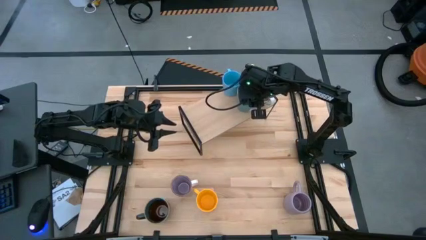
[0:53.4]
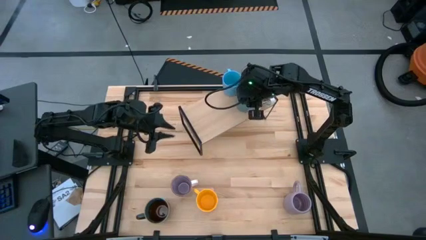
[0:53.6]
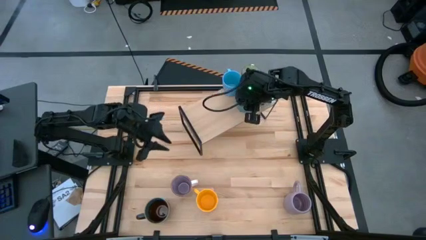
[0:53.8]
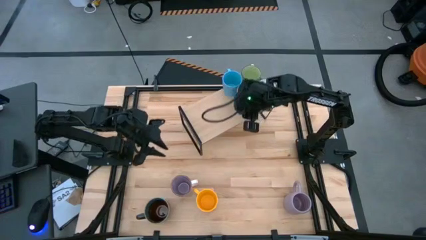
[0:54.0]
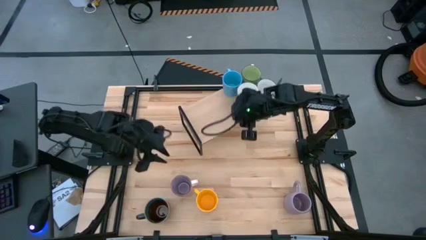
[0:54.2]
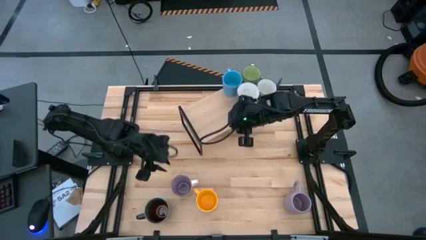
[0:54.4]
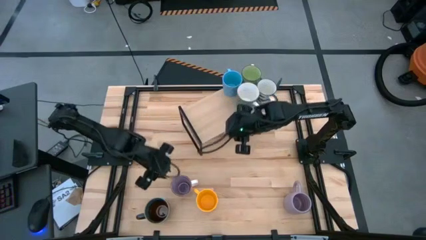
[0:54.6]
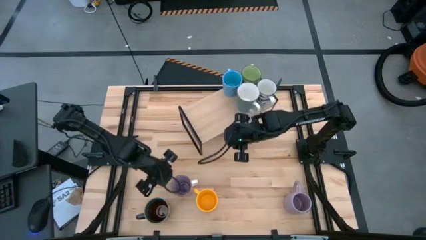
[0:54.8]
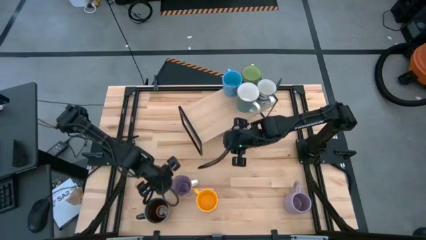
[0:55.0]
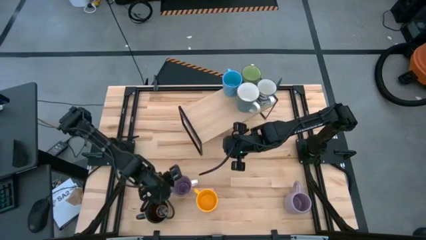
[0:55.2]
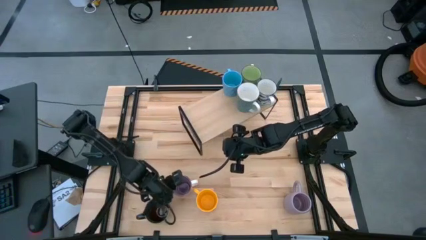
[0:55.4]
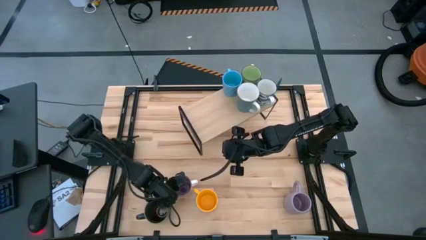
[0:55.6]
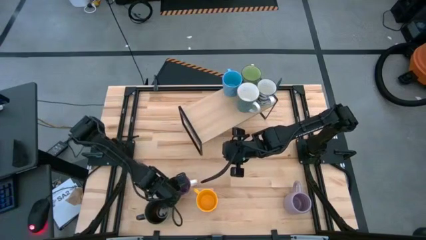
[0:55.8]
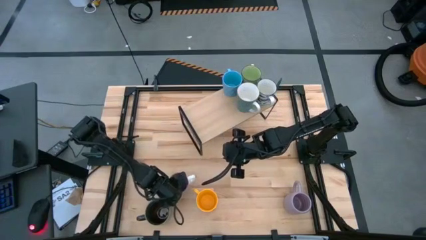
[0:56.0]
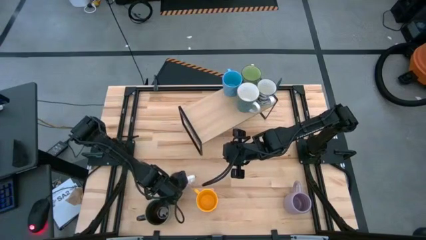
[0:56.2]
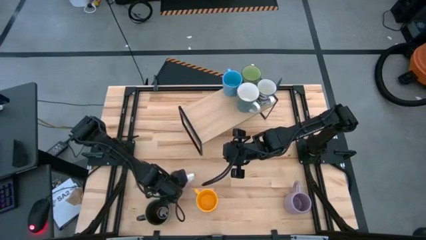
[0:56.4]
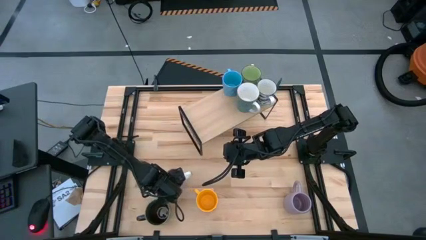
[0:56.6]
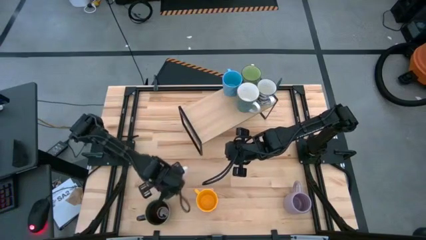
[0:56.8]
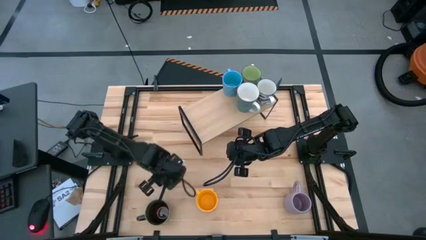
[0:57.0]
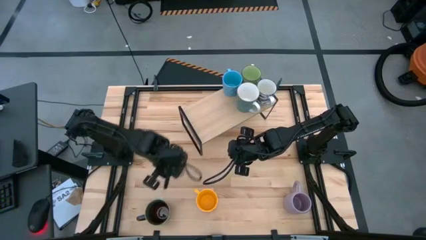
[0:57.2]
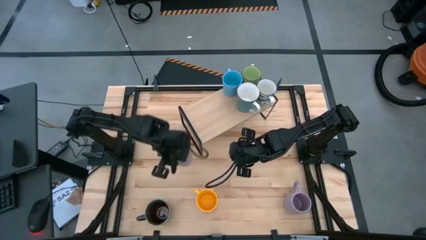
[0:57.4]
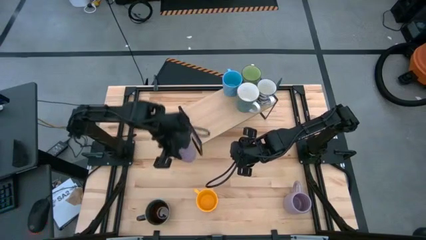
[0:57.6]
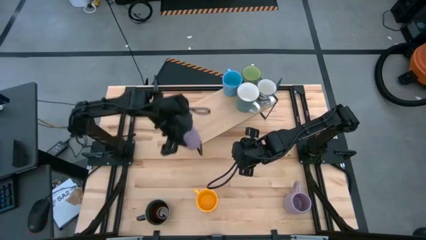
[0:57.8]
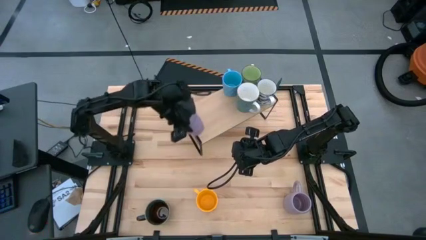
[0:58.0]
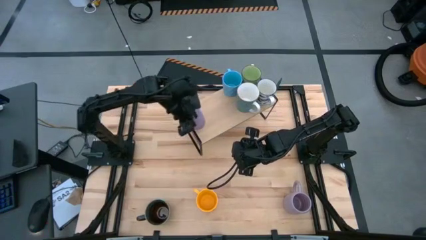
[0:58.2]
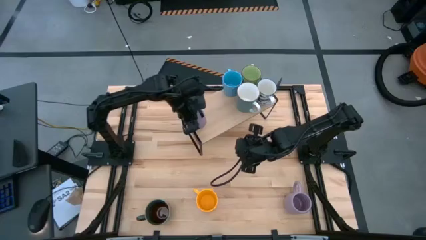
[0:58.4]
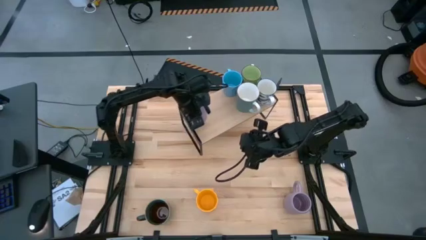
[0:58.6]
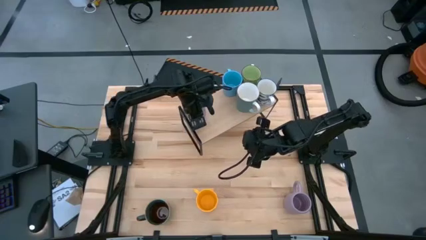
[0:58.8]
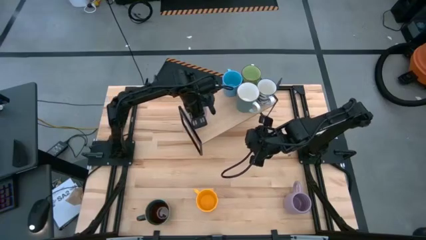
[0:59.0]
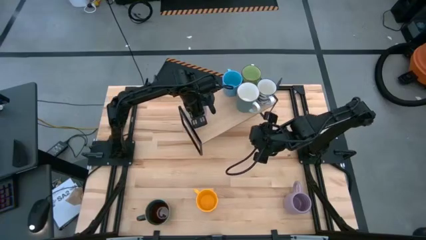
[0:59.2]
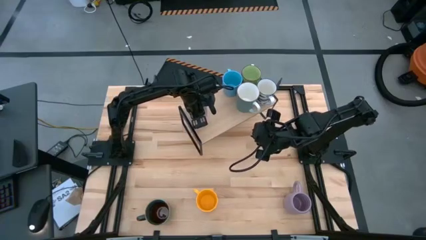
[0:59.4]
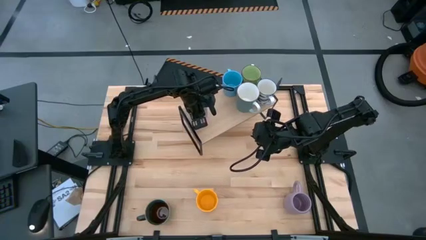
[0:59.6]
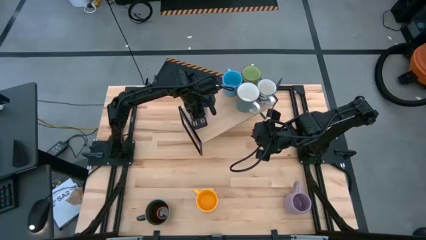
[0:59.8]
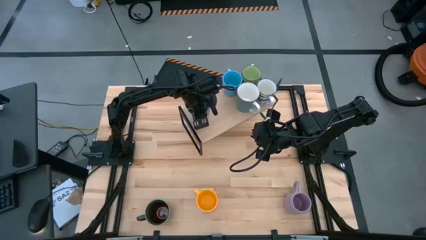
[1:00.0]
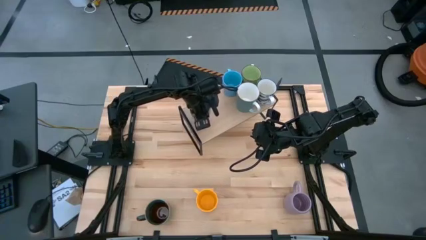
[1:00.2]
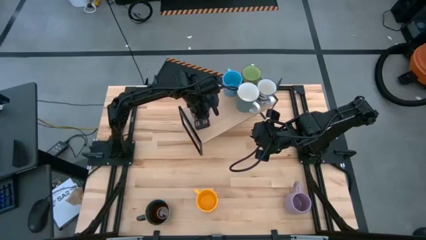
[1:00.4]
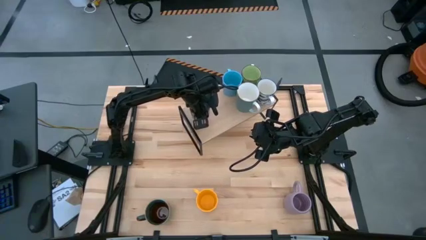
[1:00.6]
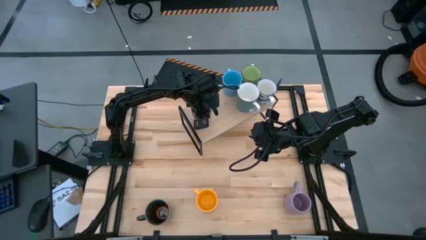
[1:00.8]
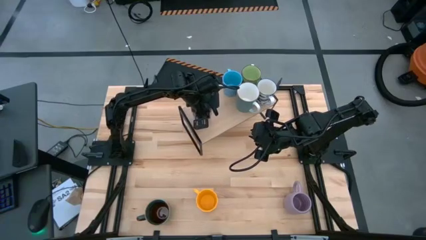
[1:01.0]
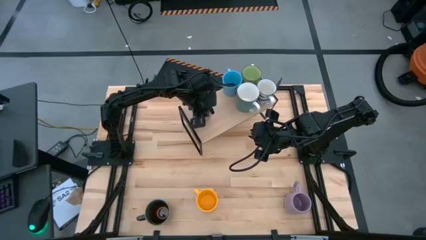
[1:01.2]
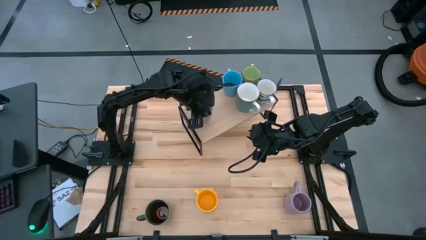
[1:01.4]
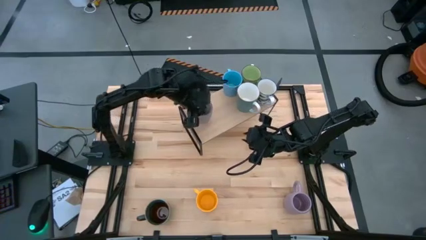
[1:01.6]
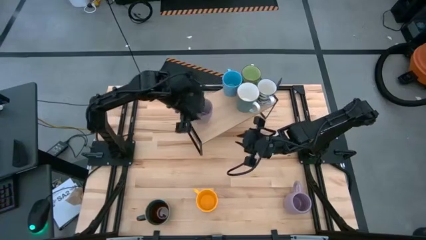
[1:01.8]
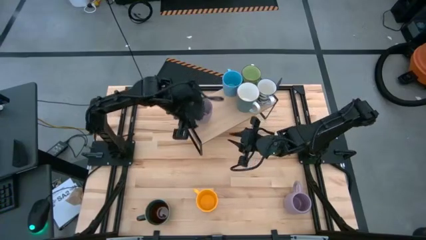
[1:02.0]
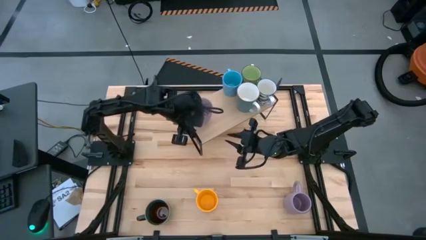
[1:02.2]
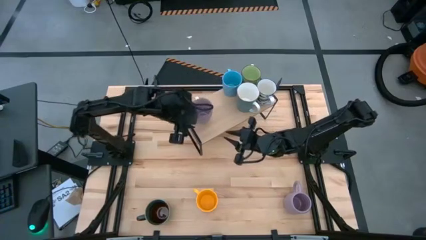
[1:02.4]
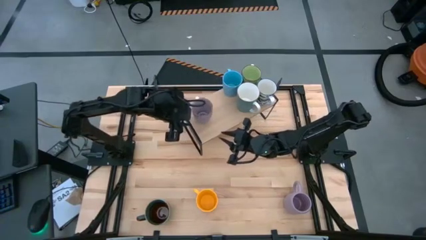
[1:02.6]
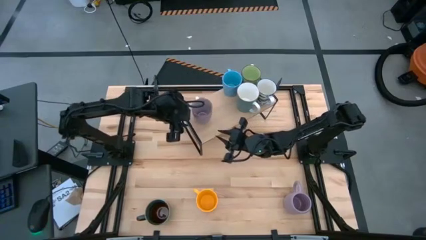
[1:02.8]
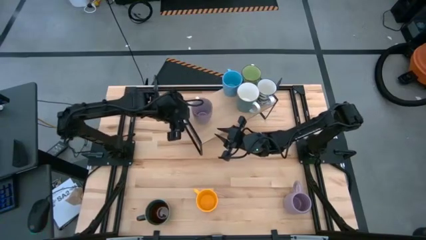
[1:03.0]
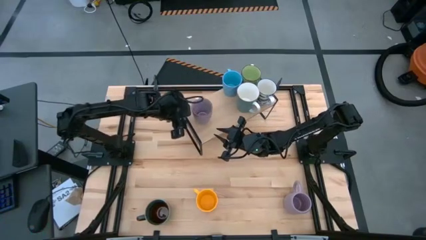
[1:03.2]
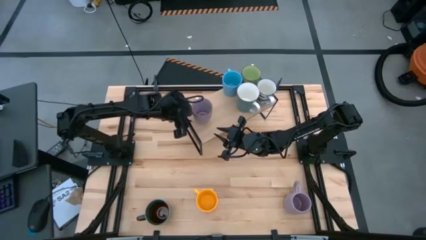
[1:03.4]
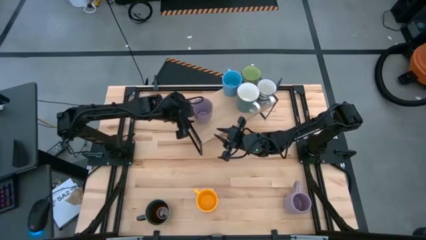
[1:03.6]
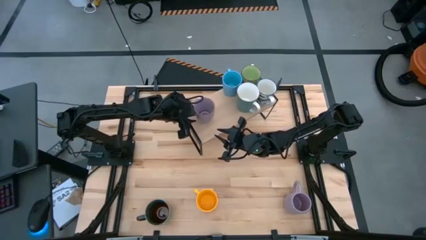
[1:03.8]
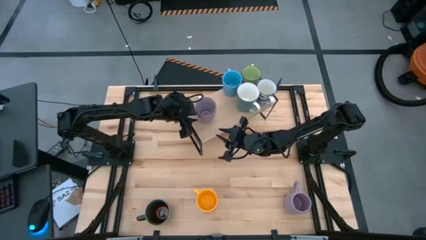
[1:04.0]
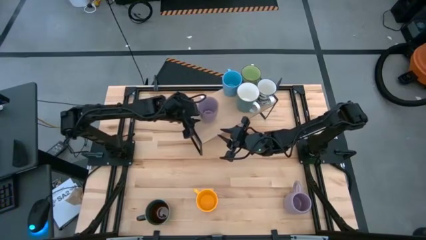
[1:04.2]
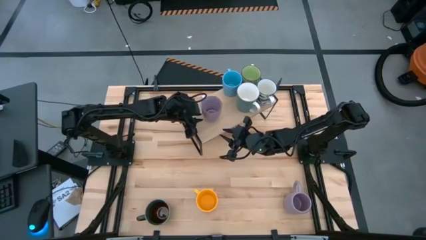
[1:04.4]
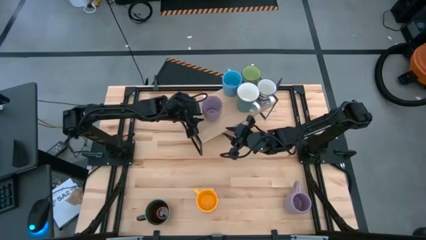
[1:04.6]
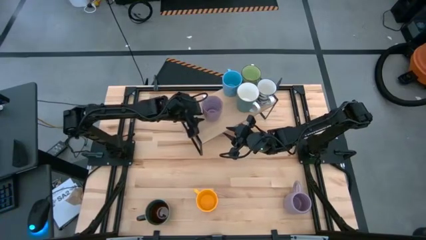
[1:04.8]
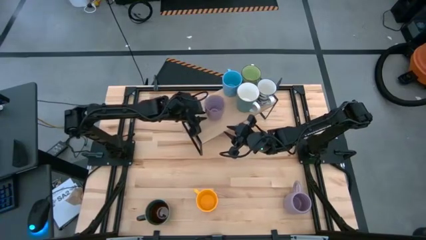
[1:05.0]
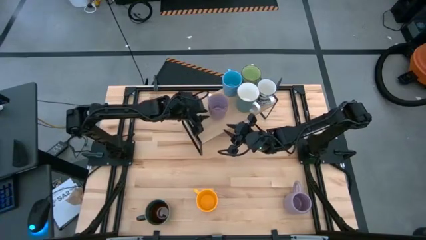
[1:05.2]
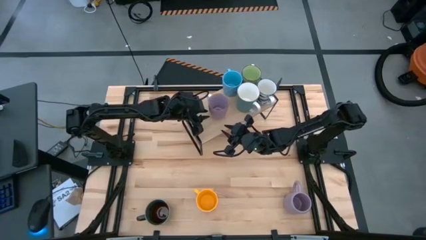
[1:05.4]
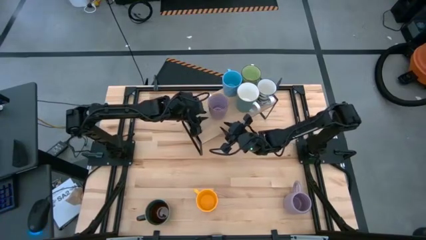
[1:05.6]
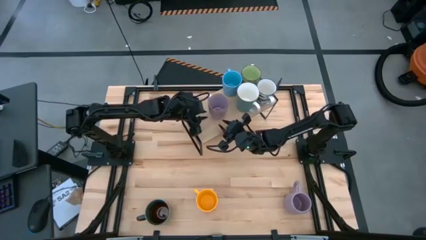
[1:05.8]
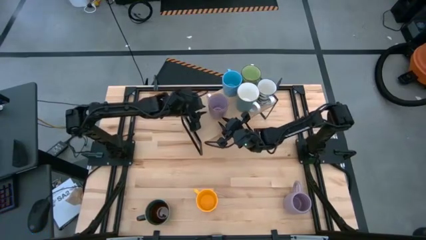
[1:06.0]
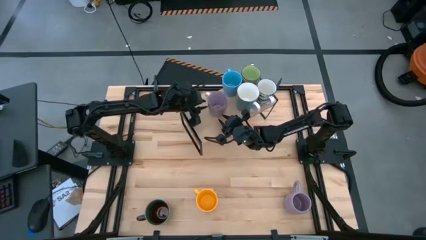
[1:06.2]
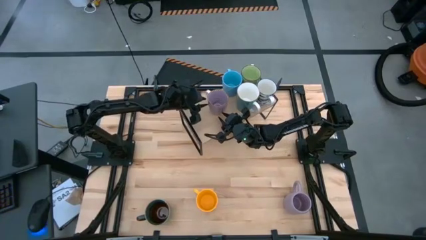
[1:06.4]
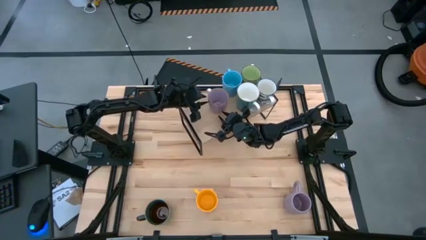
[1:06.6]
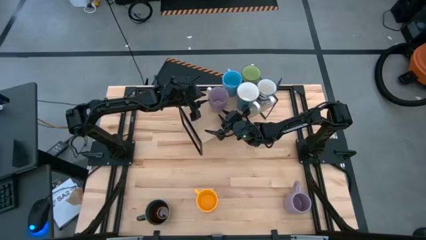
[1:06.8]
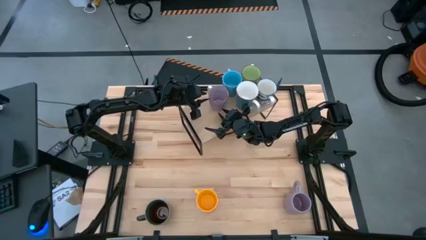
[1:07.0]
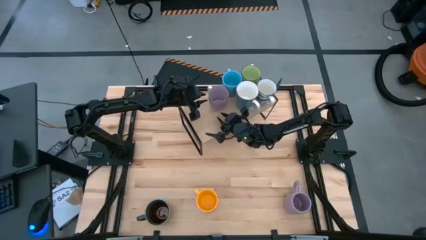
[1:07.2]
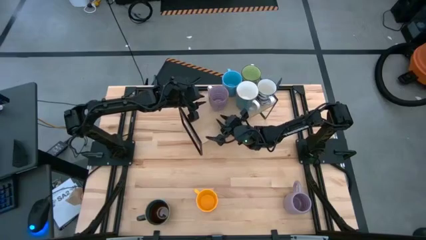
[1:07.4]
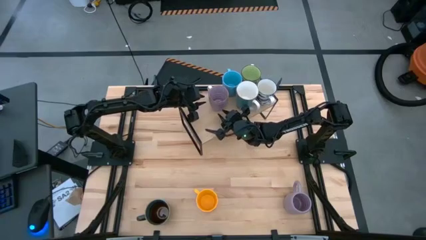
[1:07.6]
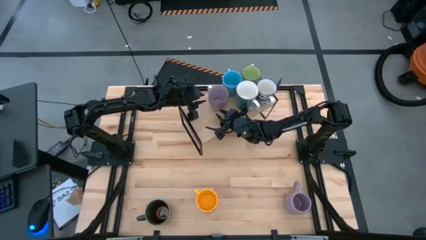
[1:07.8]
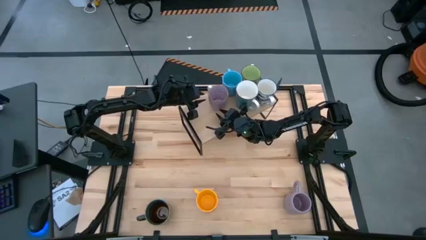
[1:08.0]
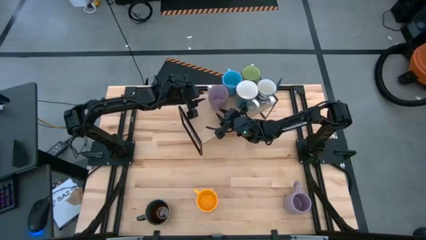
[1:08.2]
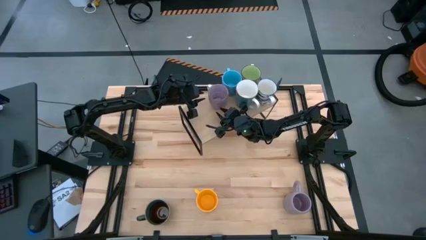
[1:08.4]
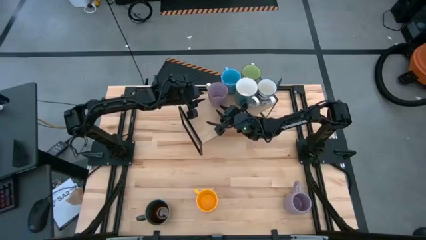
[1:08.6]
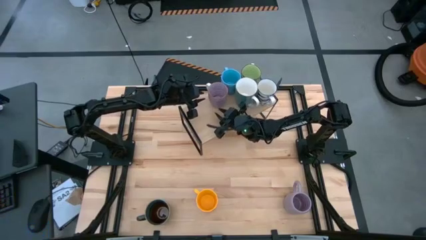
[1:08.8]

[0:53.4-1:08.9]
Task: Place coffee mugs
Put the left purple mug on the shelf
